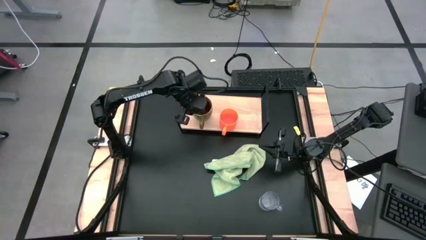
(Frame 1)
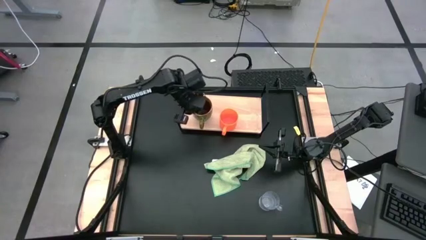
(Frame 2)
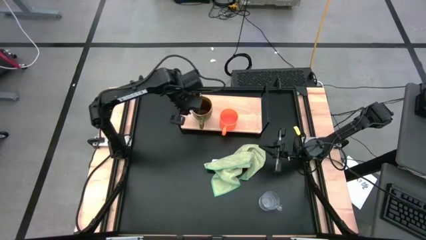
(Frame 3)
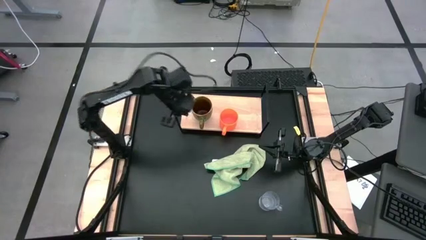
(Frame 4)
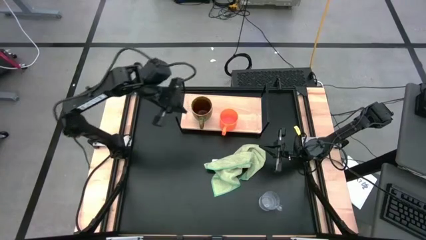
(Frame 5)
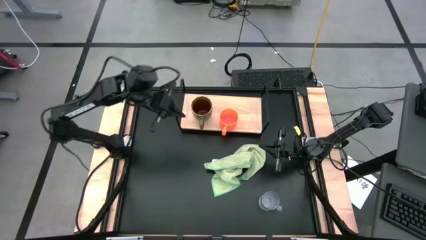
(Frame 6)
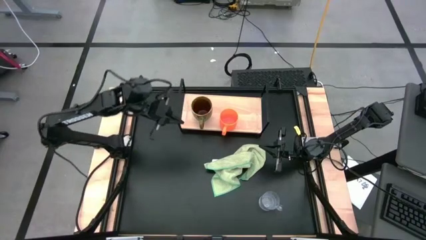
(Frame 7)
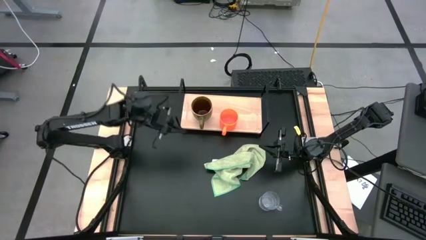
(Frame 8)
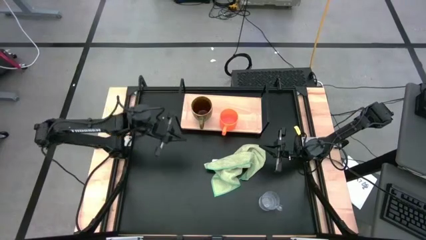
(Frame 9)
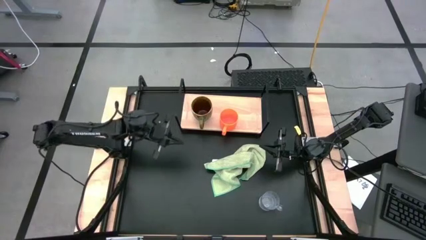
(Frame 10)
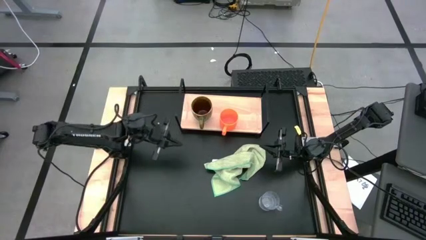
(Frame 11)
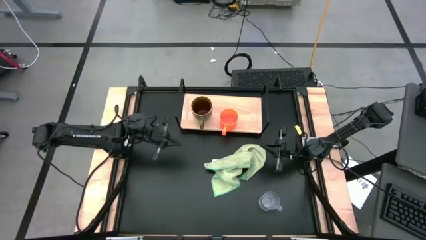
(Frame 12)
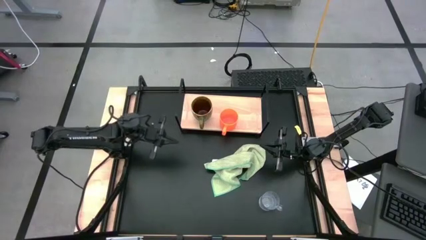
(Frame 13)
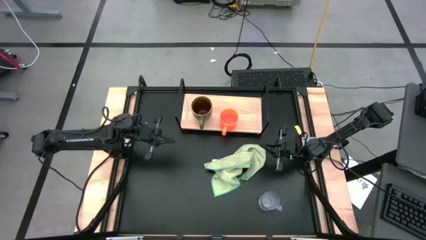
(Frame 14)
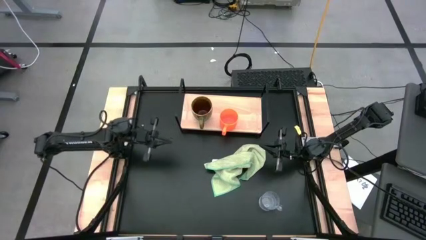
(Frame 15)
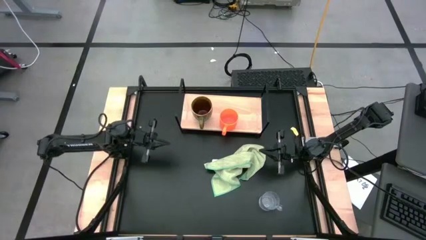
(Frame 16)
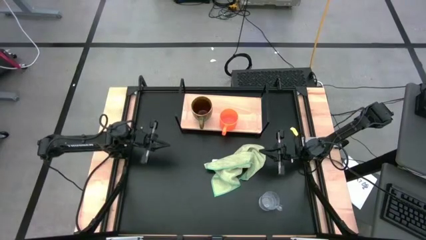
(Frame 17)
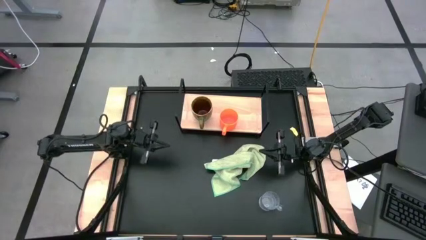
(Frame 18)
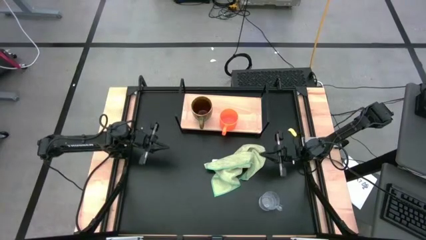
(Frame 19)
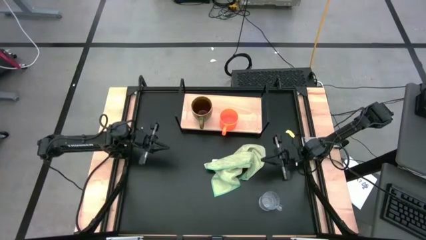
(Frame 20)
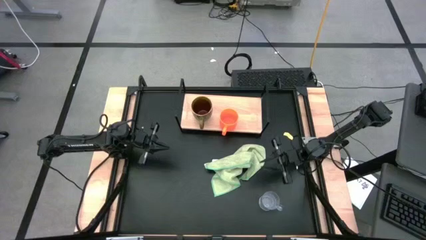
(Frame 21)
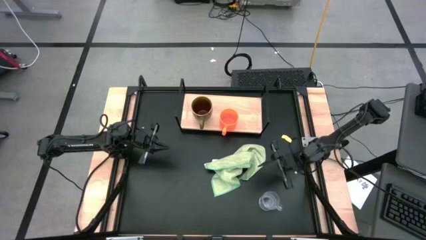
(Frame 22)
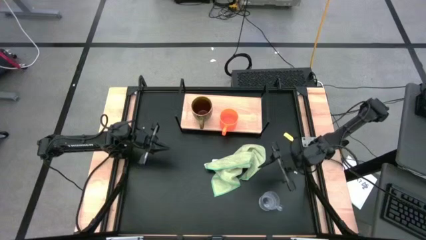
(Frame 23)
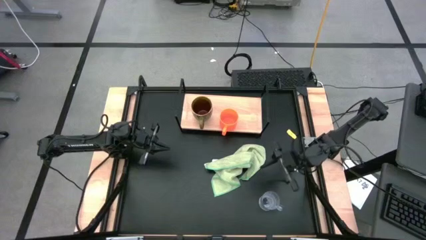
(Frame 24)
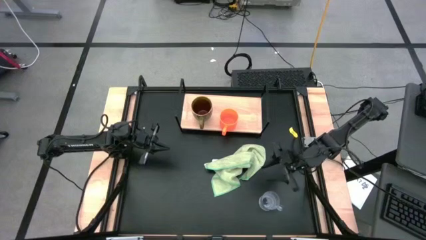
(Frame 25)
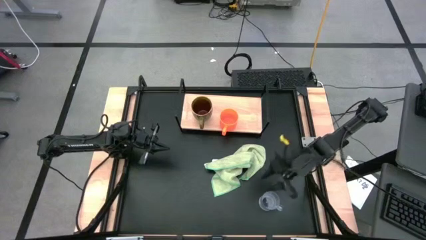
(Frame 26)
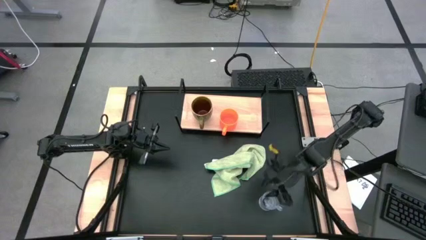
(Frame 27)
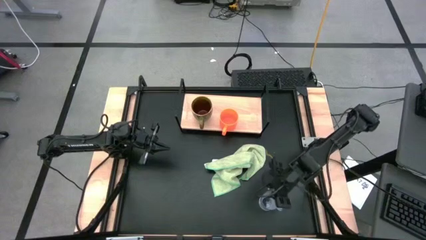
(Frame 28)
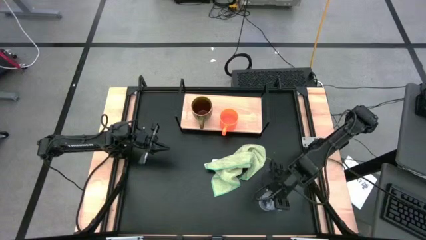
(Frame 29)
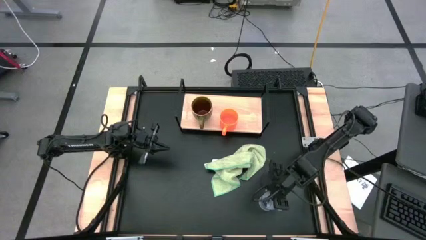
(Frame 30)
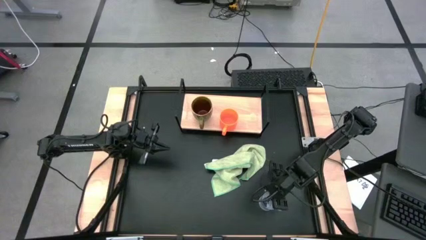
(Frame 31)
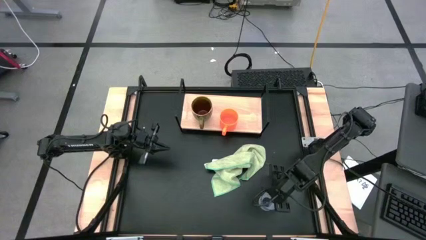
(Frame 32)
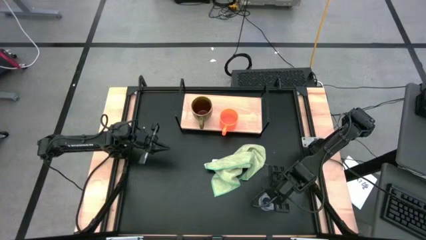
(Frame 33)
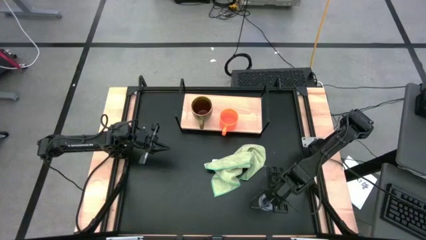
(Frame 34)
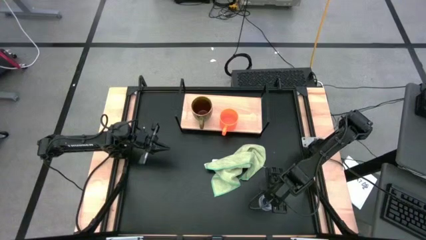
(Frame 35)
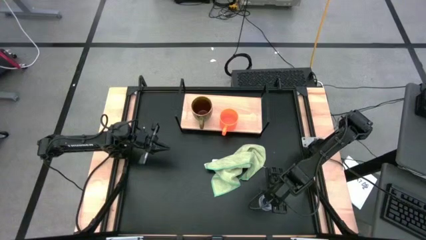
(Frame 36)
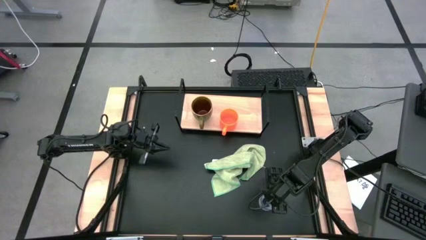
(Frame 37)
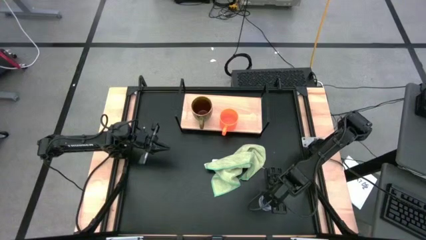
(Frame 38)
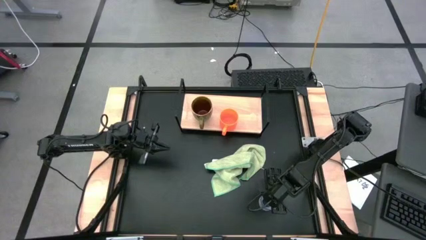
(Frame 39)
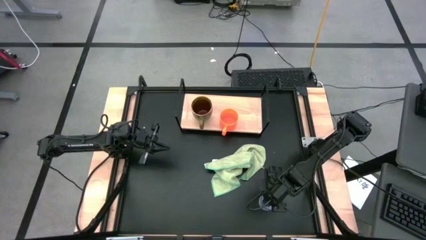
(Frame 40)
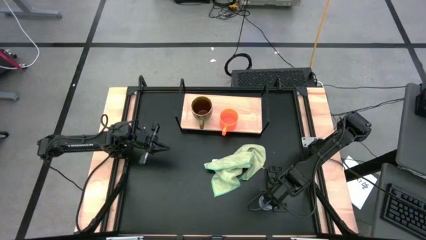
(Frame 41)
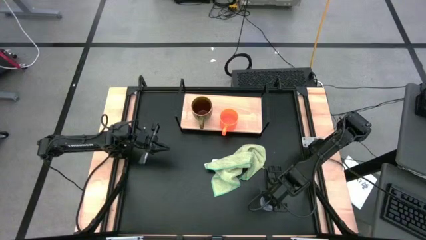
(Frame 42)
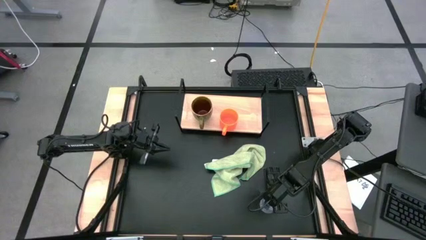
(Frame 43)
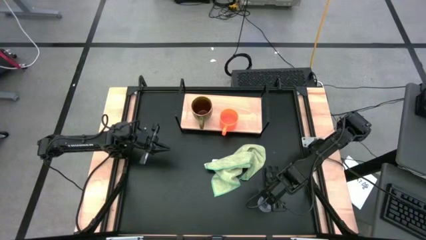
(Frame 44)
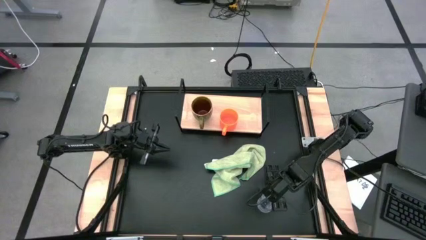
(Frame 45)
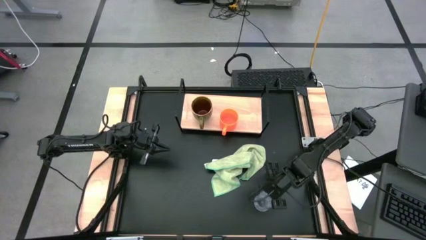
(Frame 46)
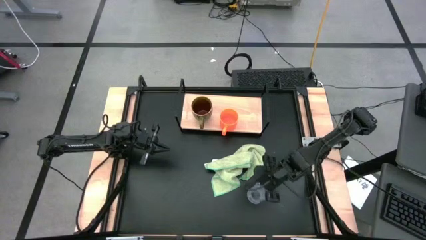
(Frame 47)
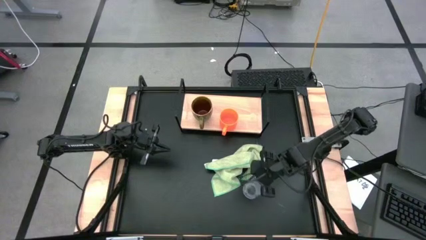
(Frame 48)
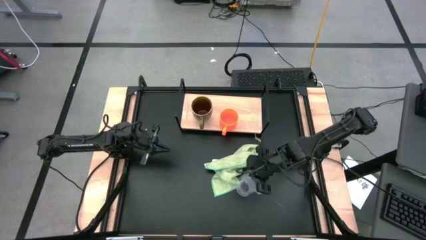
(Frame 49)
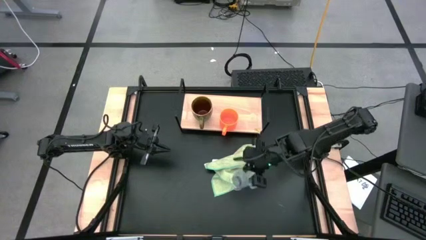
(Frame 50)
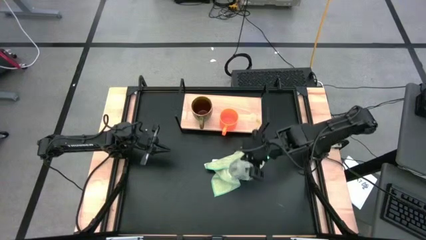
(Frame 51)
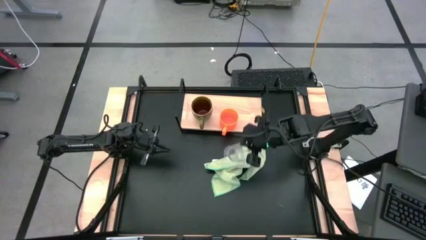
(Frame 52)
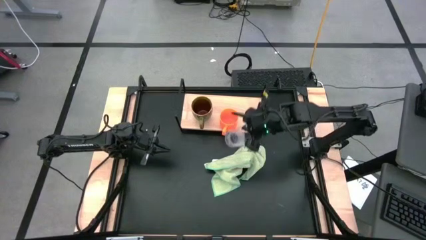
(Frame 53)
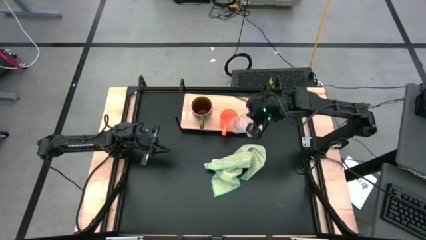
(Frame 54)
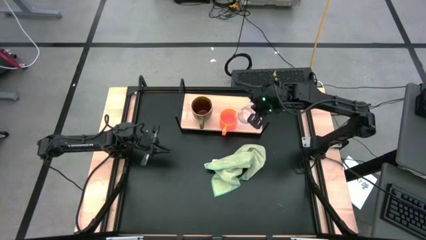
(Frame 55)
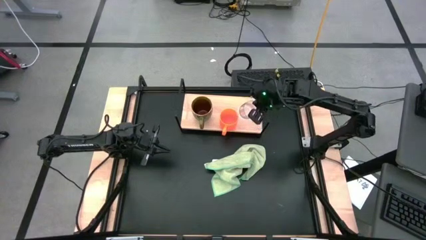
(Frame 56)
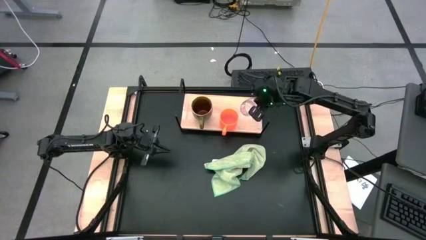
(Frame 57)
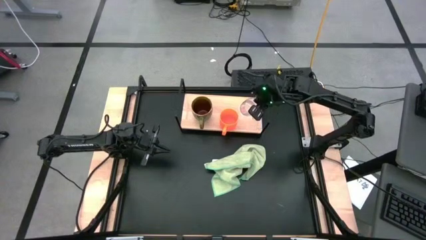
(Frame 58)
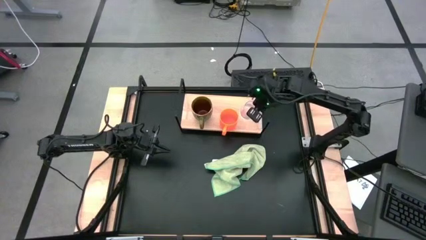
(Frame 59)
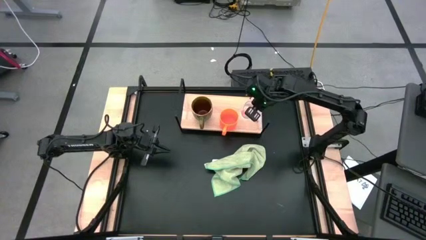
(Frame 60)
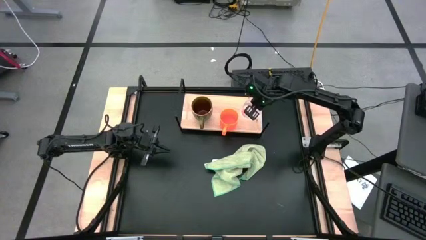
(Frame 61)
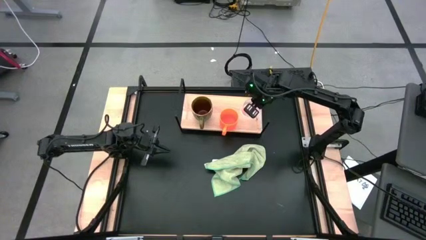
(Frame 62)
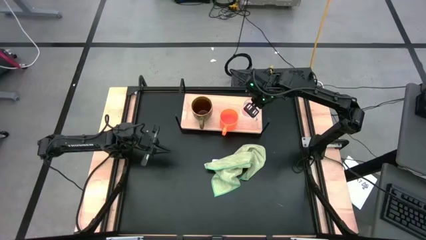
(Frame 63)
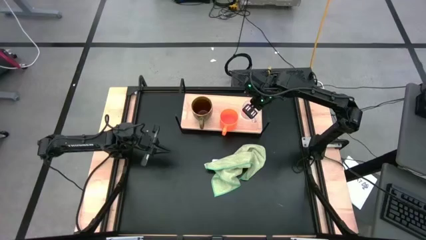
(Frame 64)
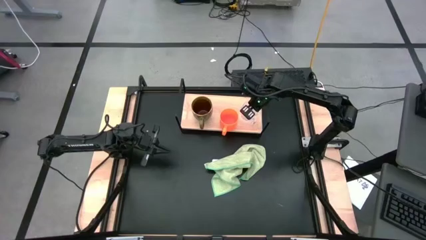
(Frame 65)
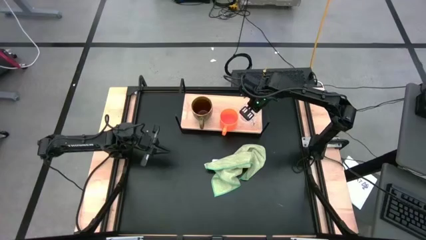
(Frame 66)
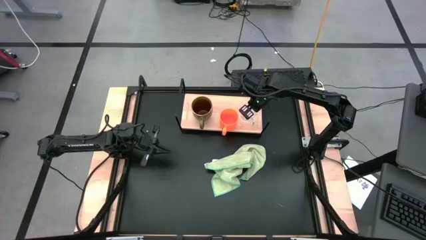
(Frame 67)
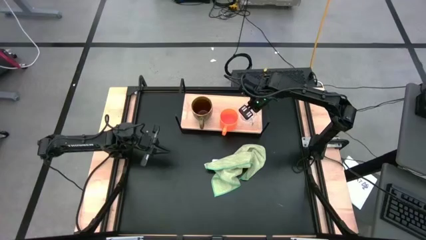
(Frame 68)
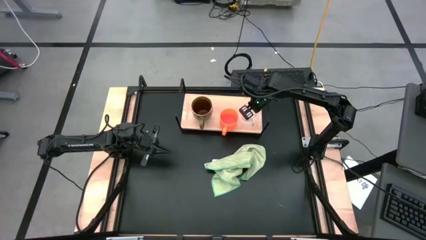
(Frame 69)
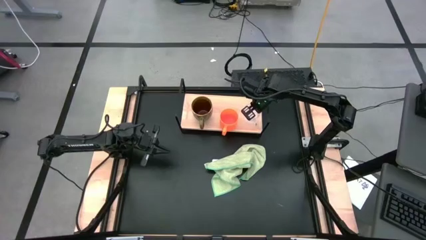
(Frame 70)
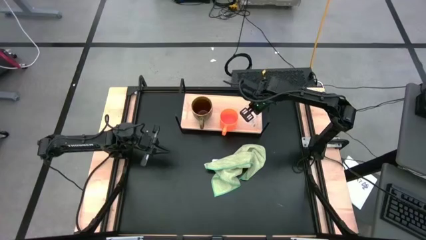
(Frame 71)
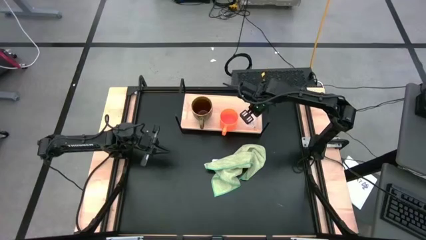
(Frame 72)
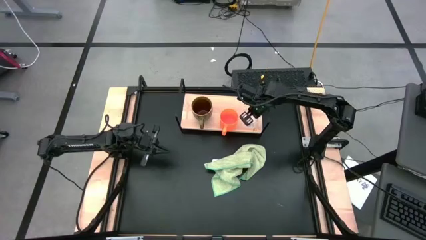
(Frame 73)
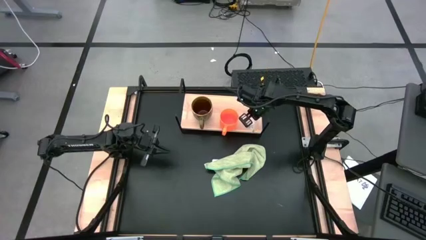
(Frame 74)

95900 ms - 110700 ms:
Task: Stack small to large cups/mugs on shelf
Put the transparent mug on the shelf
